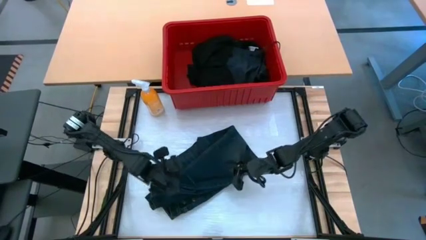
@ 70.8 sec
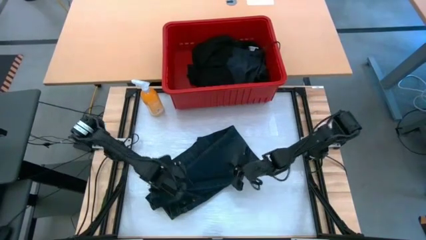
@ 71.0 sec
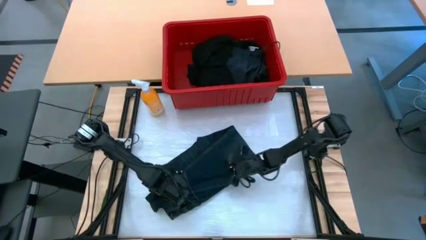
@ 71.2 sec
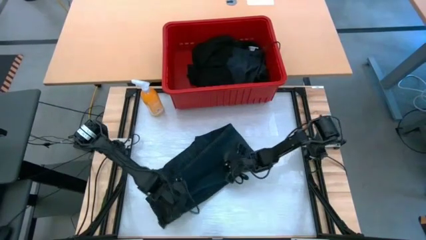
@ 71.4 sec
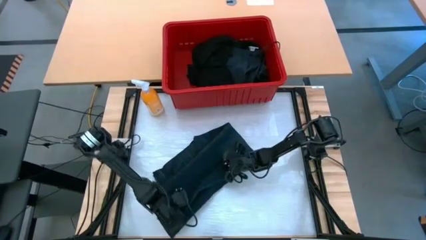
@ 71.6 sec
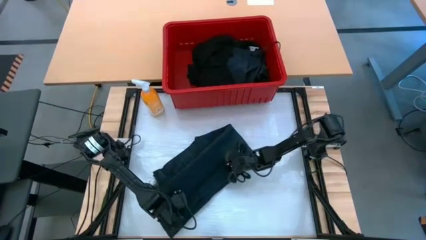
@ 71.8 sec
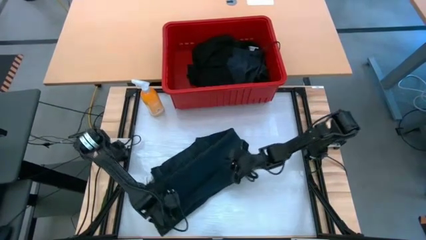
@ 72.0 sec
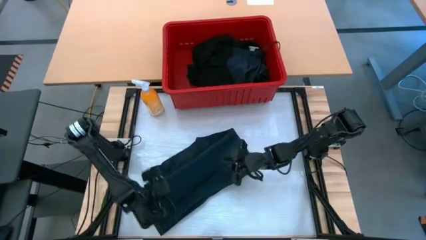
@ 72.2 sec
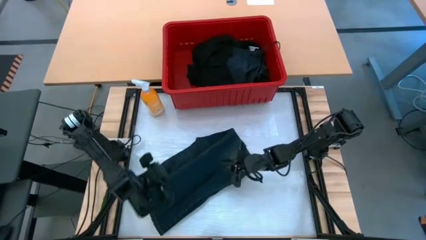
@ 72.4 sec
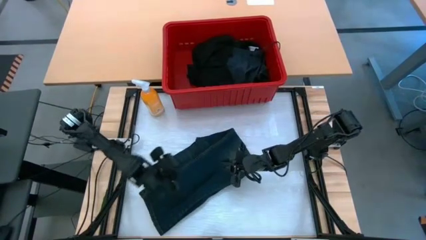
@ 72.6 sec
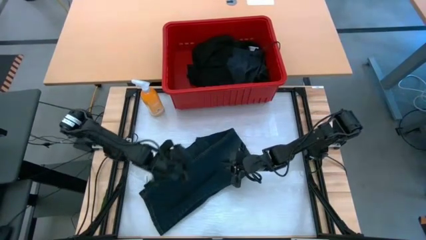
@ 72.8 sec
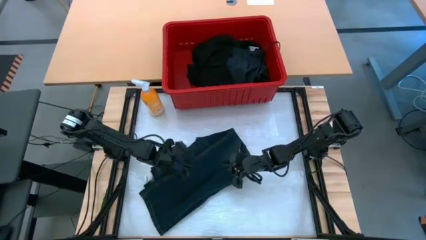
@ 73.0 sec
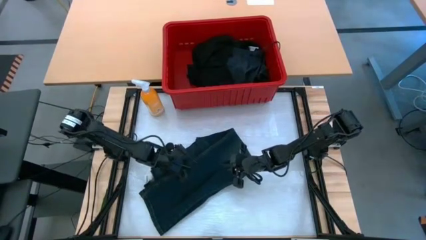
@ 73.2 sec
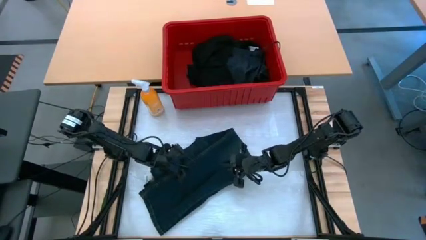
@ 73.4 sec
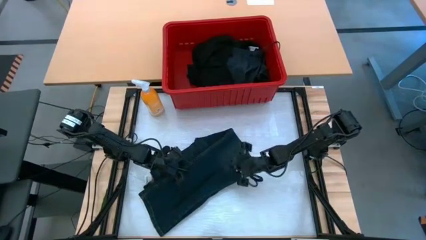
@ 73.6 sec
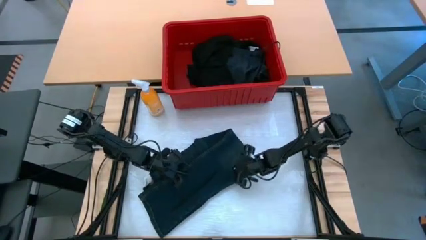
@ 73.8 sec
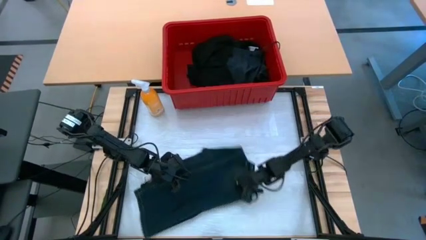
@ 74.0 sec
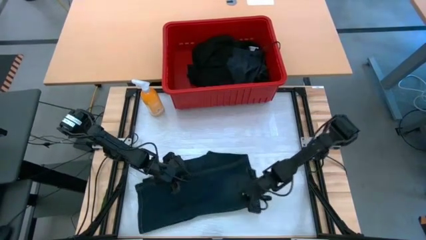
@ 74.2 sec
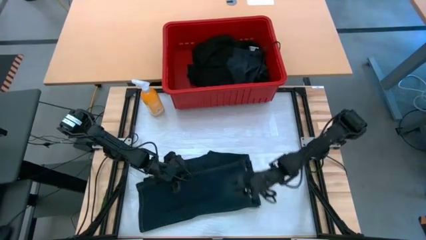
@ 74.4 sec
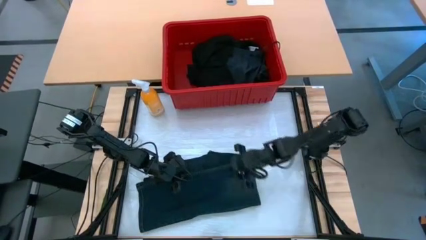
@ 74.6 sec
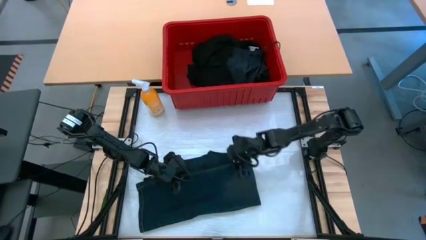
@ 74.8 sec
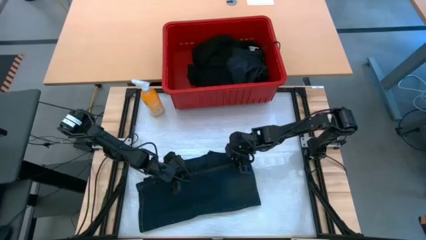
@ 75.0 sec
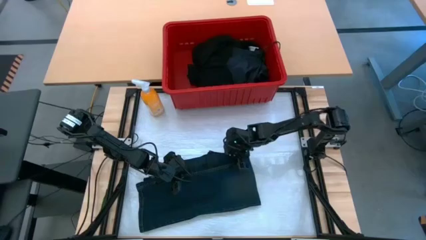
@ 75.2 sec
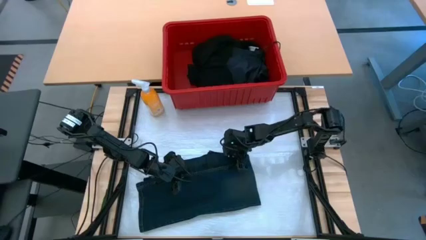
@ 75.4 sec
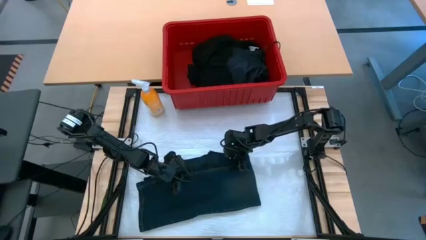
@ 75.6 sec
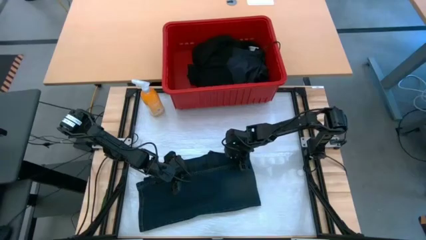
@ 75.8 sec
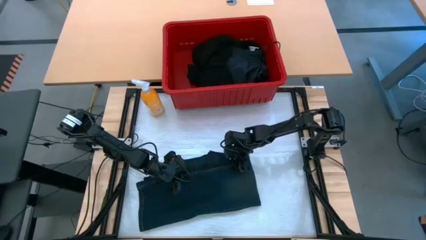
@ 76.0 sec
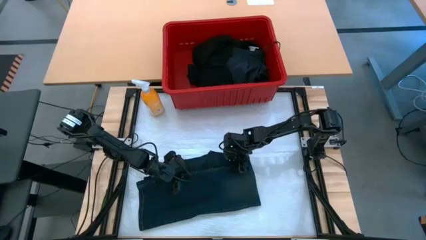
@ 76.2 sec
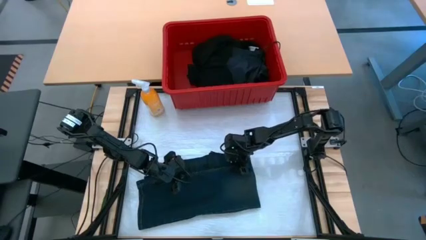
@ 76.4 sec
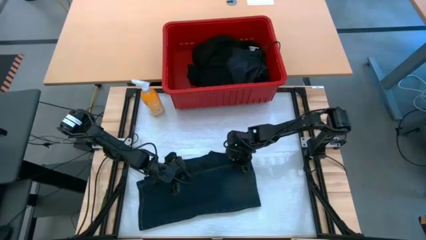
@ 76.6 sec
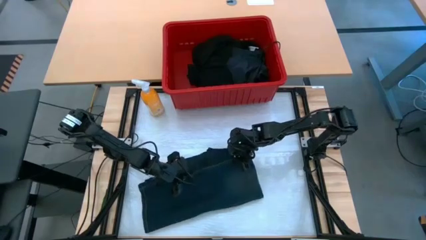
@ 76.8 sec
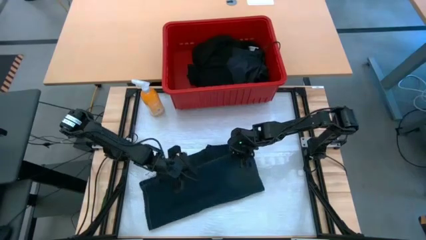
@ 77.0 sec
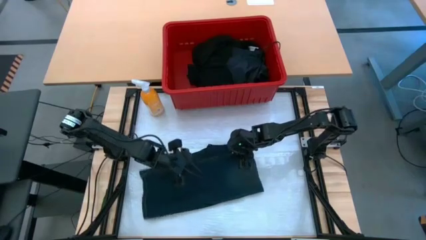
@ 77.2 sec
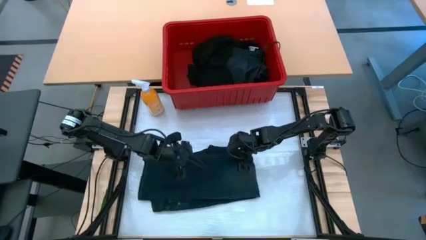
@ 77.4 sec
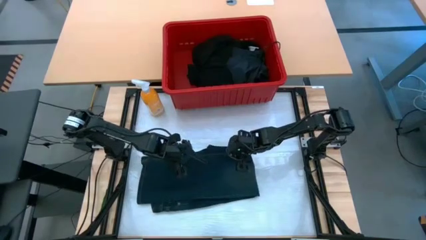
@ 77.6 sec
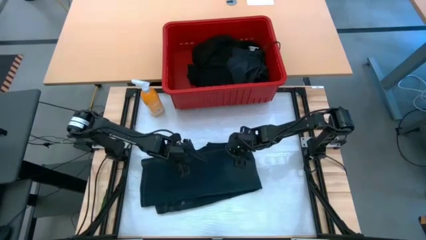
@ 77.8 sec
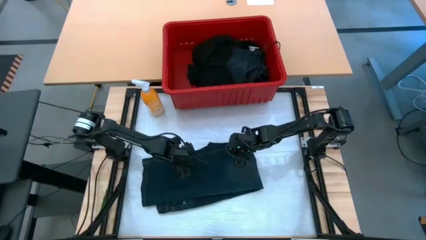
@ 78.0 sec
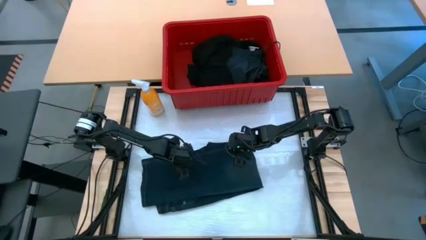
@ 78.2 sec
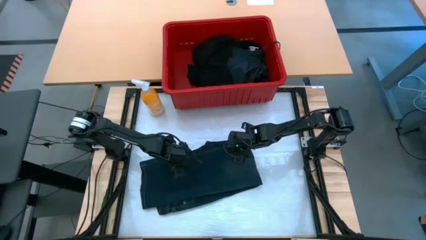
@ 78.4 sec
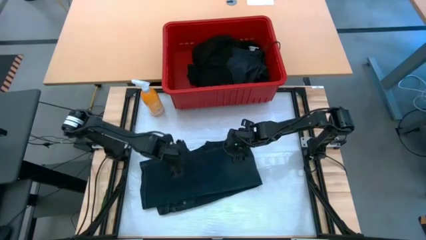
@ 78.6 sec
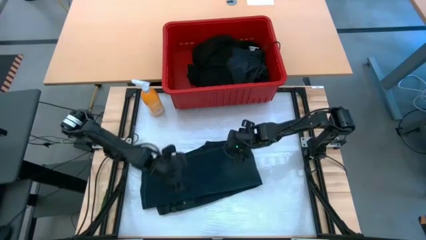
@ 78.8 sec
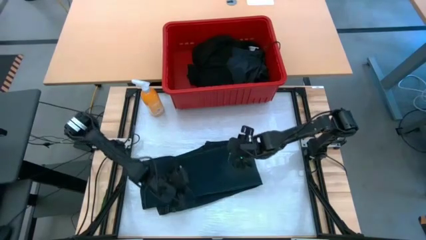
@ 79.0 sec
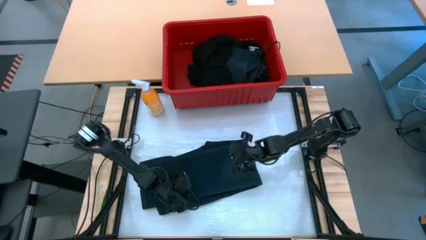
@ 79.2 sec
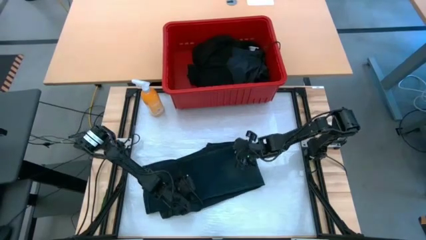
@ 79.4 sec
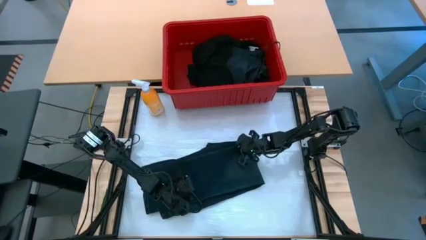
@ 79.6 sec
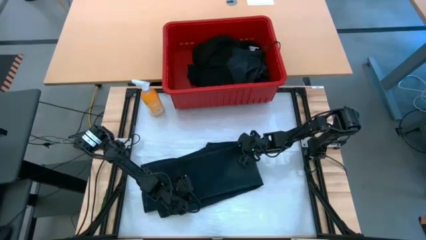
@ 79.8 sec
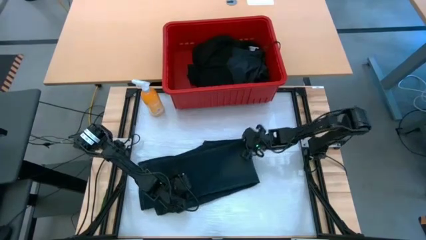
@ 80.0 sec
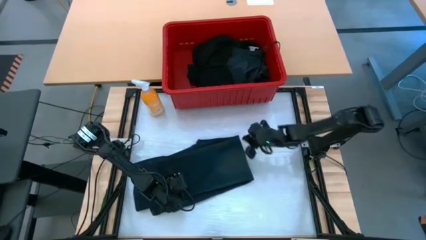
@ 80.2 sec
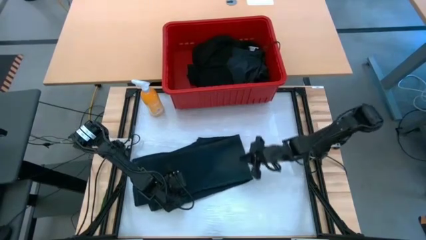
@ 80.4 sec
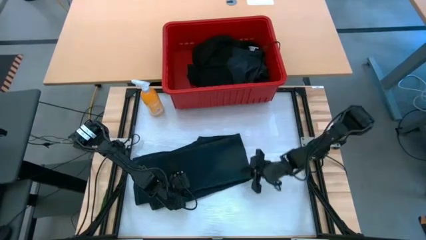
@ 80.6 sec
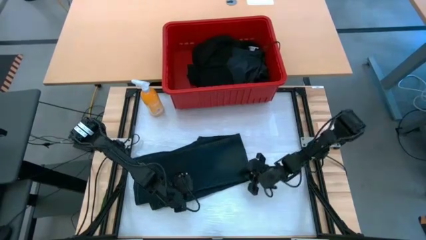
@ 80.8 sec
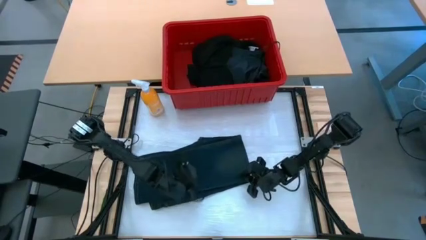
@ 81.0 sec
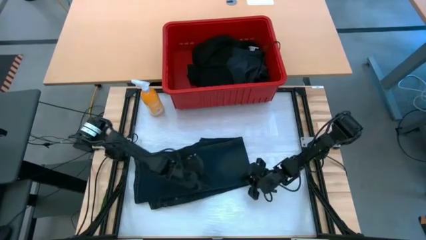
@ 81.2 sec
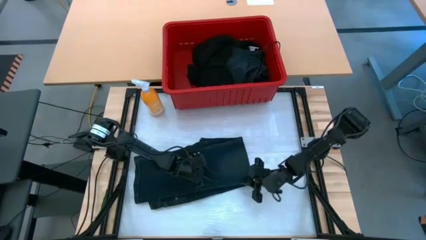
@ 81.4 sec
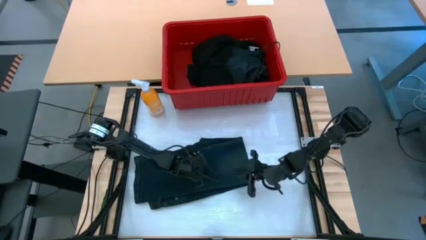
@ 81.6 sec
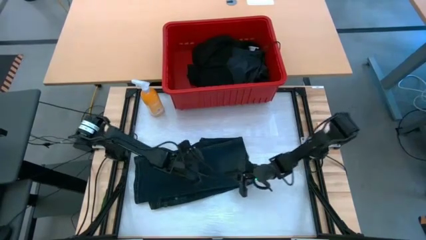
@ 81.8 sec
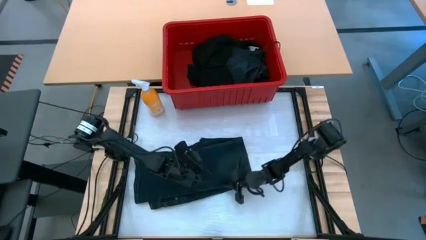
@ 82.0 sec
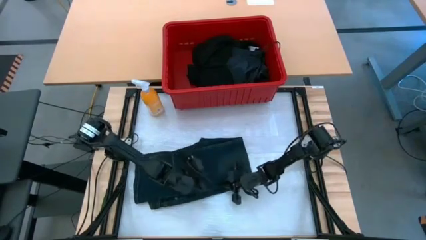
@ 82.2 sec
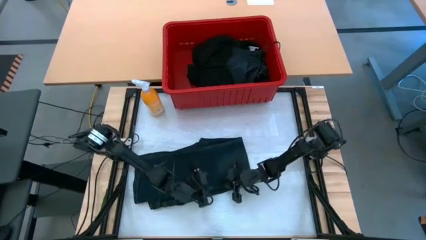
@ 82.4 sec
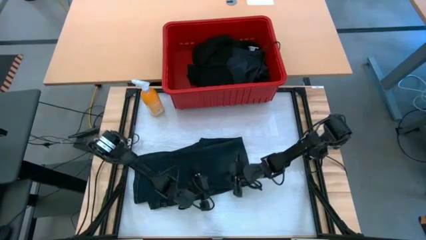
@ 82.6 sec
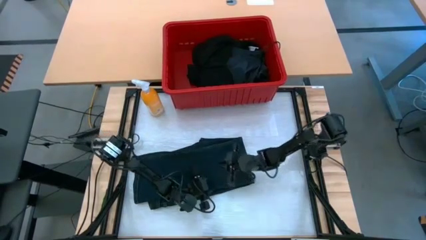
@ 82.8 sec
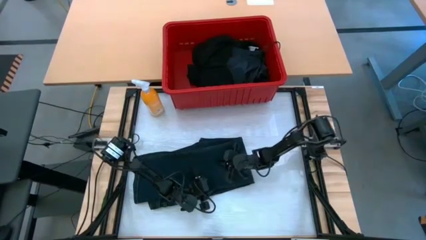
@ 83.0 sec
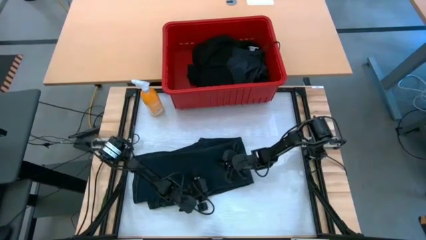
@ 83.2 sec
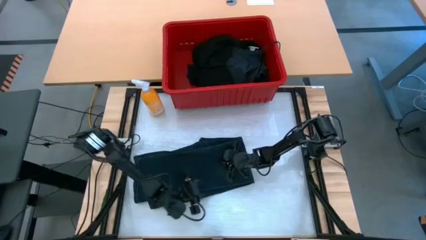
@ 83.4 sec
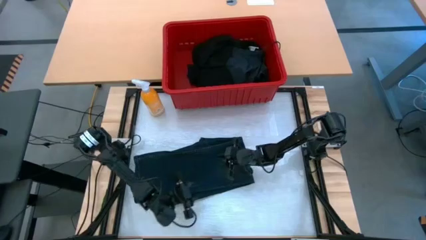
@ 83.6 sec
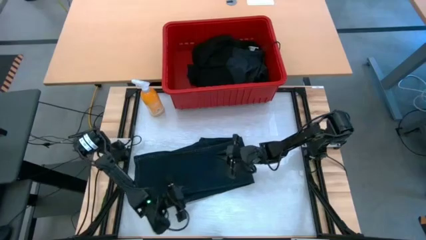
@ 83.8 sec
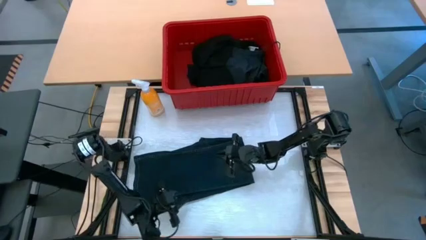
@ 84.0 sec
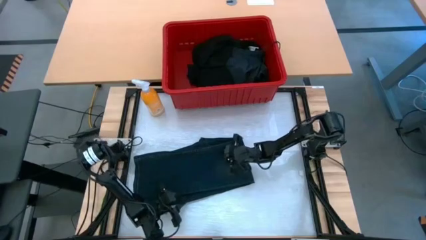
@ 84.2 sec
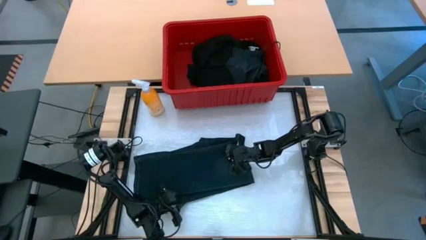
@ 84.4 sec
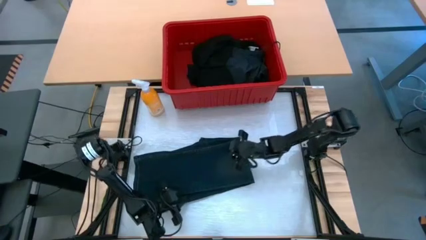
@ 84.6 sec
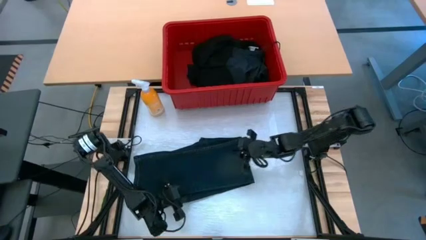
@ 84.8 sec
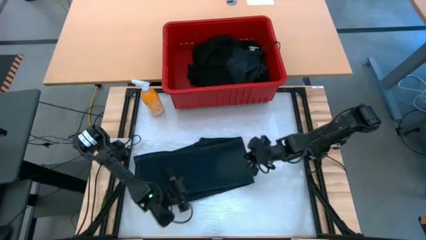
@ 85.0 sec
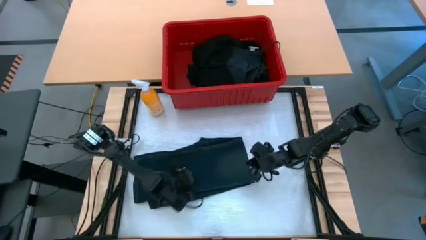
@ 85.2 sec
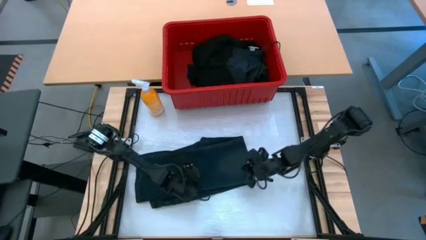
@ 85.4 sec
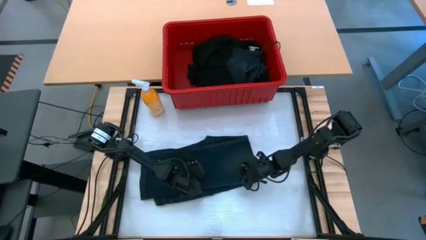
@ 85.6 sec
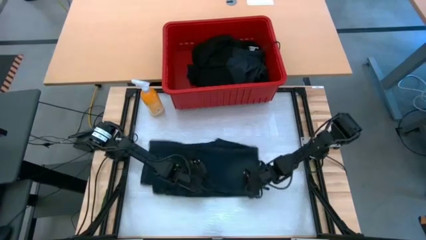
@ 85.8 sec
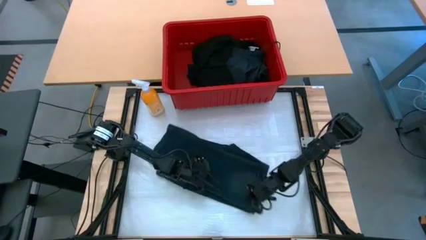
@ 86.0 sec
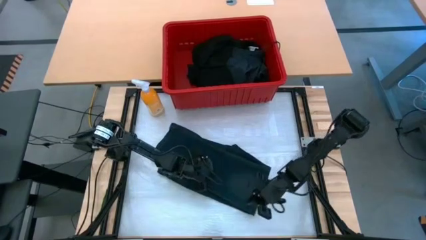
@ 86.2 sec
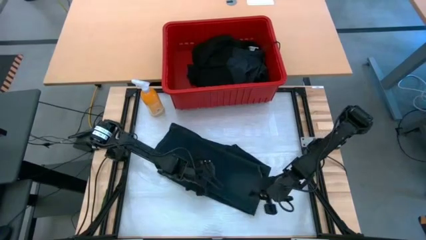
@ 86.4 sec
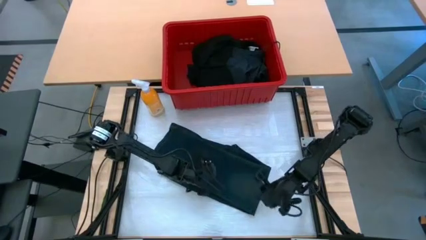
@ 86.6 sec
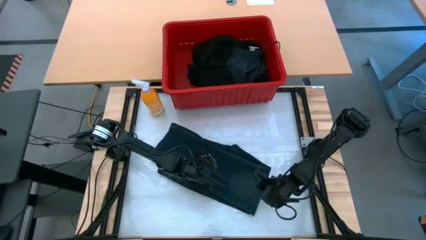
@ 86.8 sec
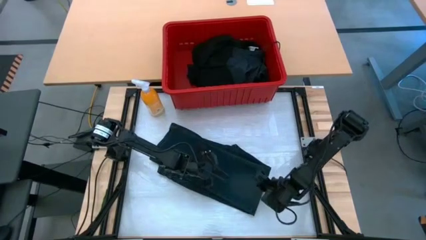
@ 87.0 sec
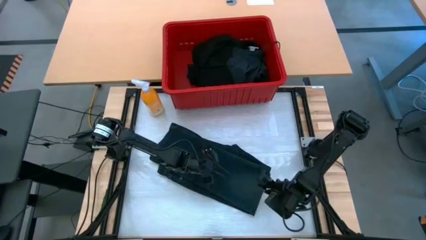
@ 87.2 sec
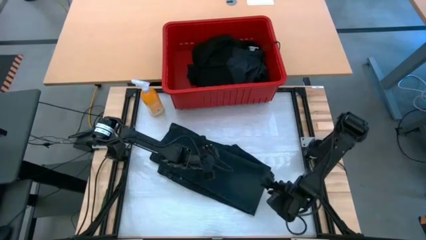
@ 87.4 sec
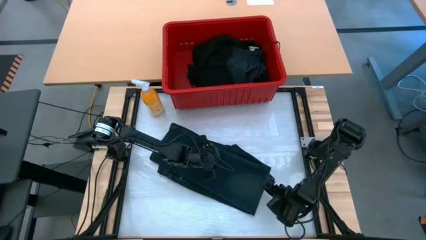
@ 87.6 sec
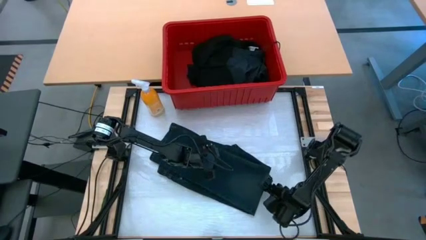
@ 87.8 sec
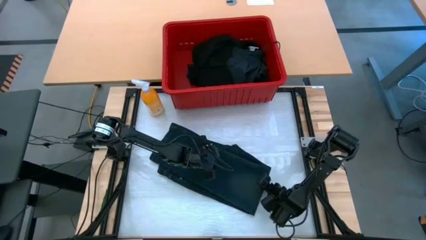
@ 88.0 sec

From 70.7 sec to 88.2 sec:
Task: Fold Laundry from Bin
Fold the dark blue pants
